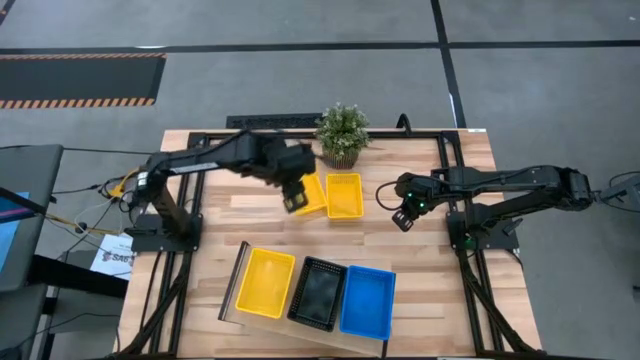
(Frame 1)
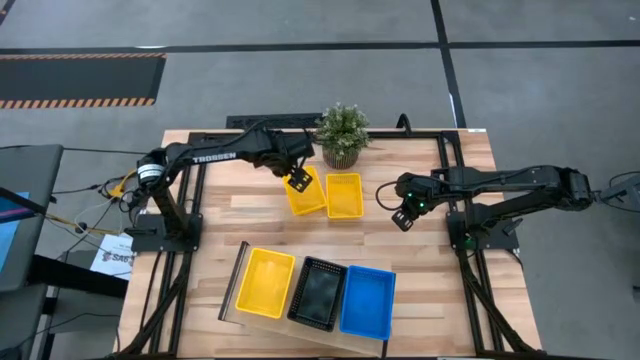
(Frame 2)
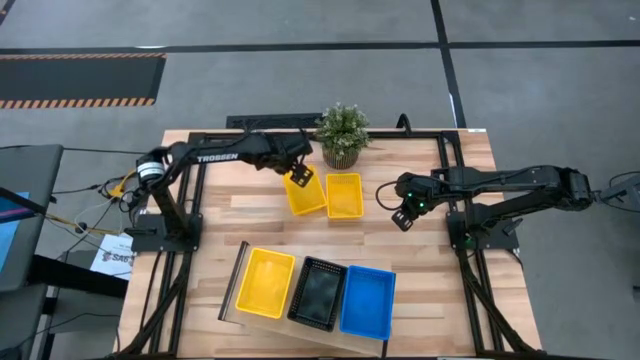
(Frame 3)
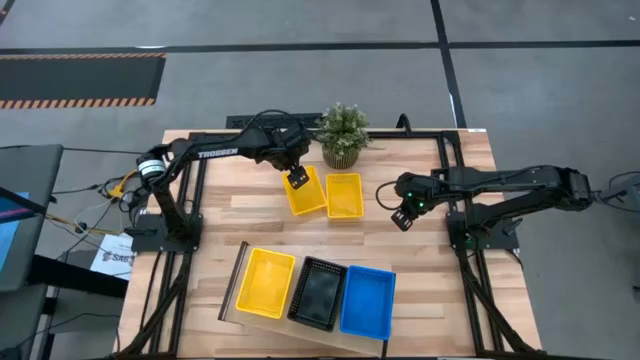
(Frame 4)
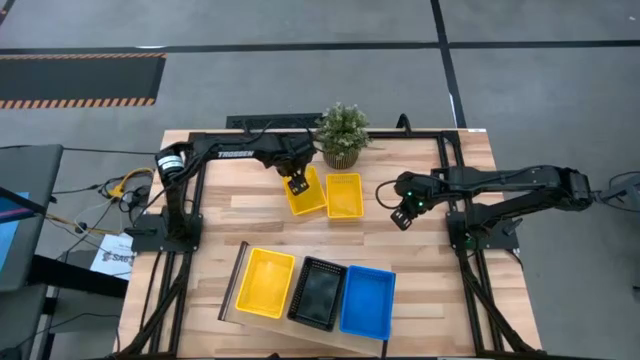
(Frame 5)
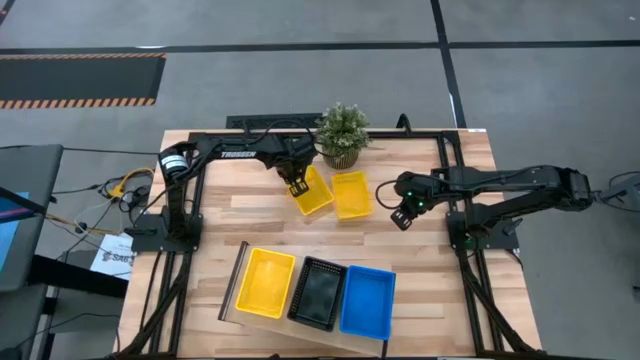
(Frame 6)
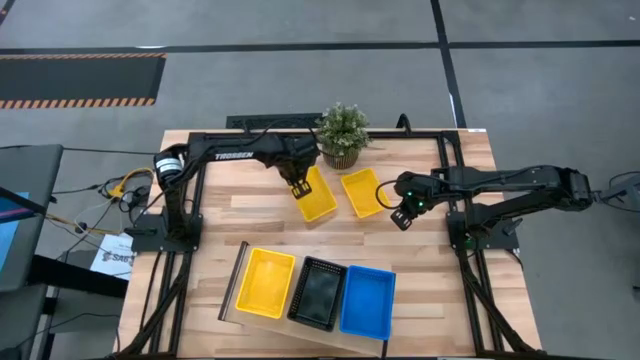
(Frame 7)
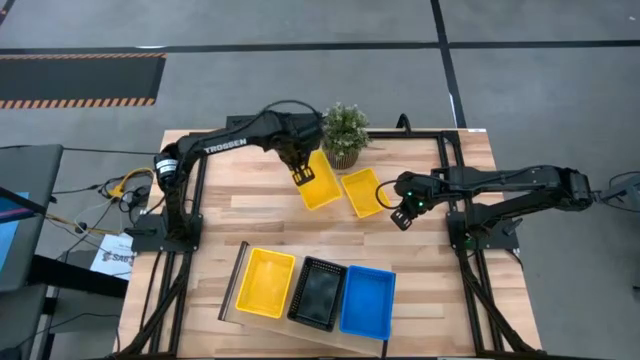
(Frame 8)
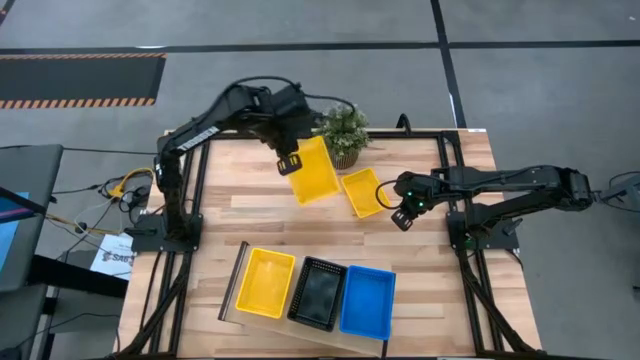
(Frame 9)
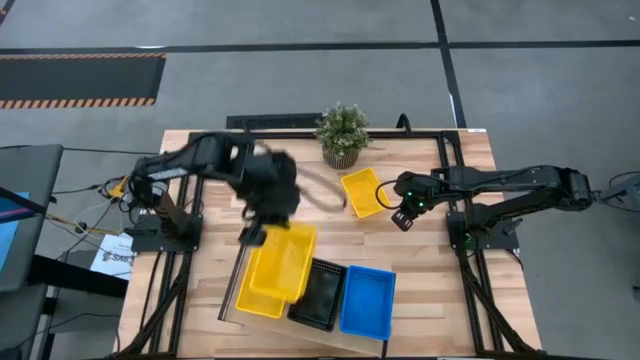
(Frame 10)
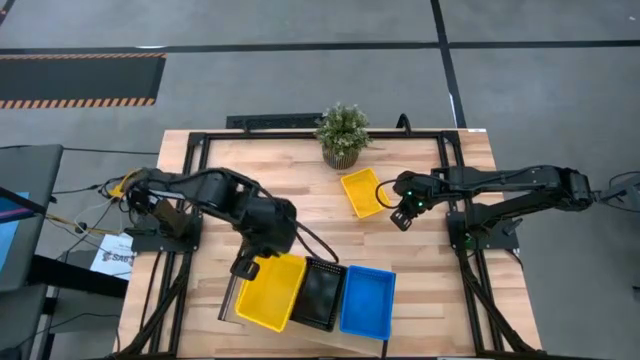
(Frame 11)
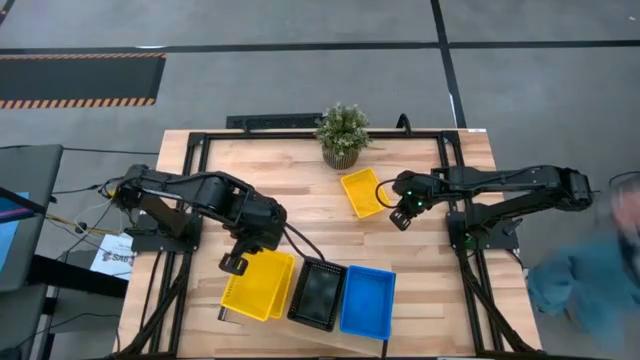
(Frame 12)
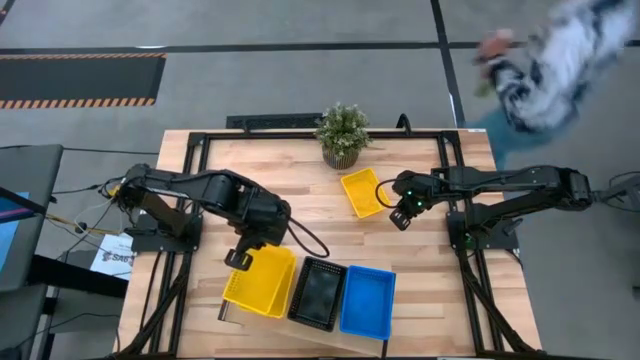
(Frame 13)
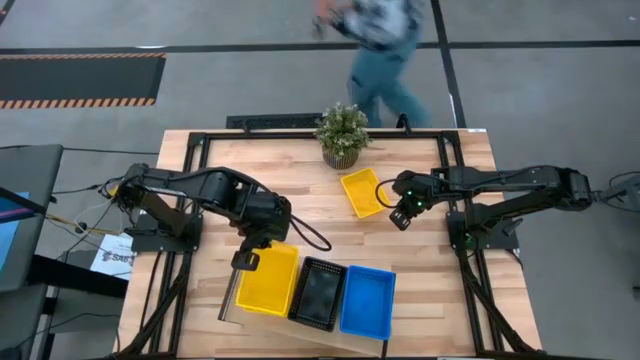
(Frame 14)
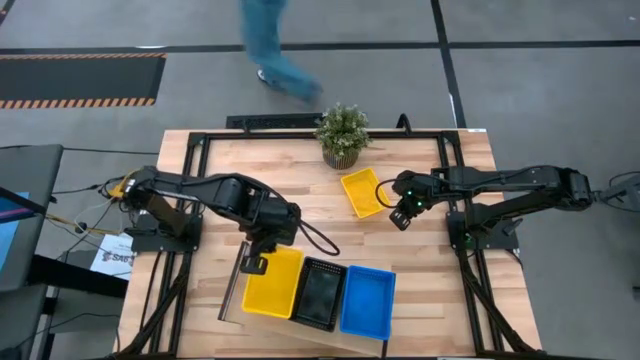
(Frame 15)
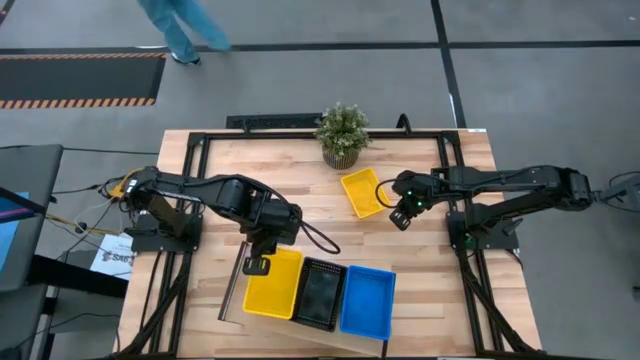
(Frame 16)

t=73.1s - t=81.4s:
Task: Stack baskets on shelf by color
Stack the left yellow bin on top of the yellow bin on the shelf

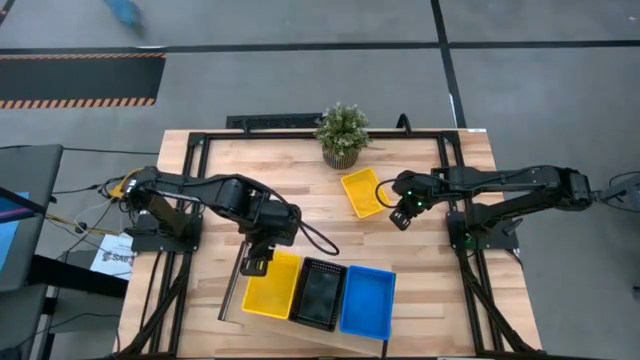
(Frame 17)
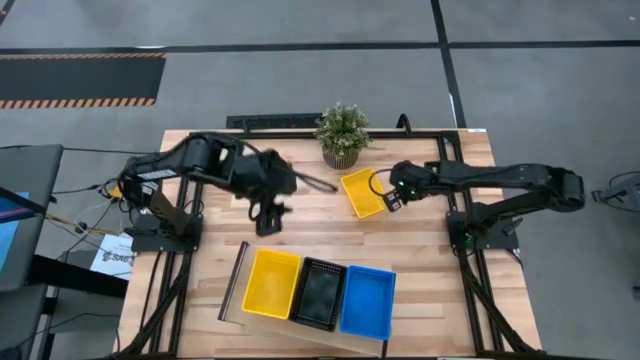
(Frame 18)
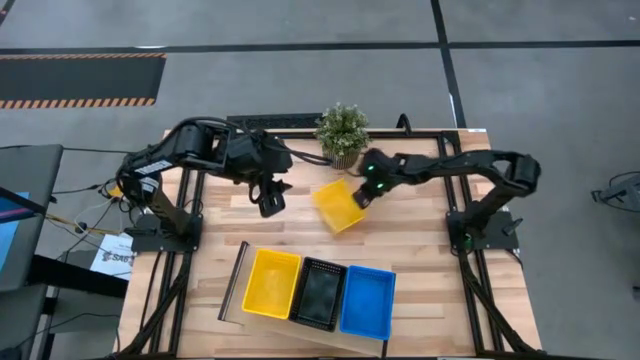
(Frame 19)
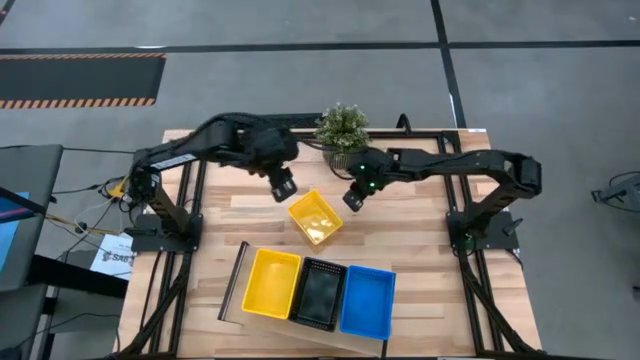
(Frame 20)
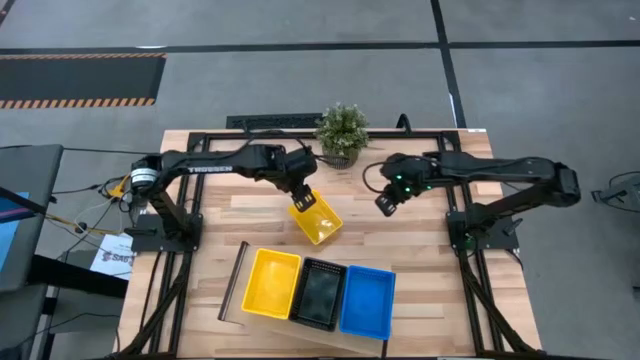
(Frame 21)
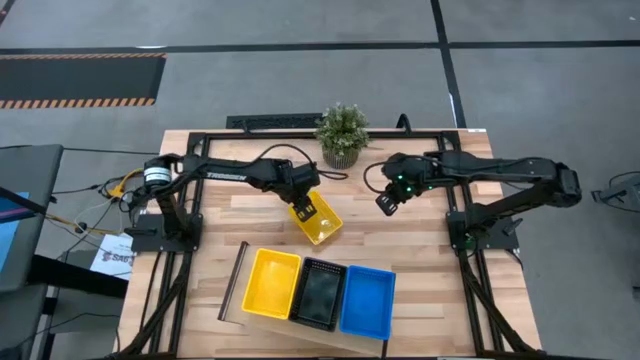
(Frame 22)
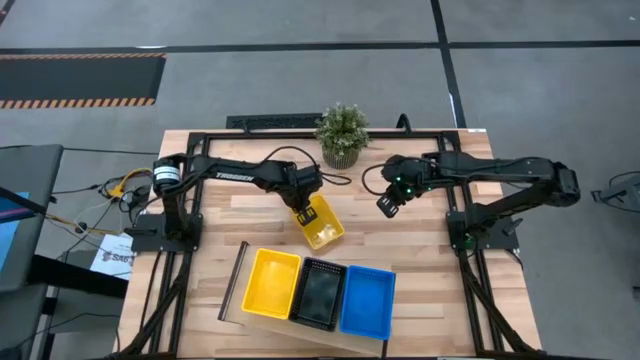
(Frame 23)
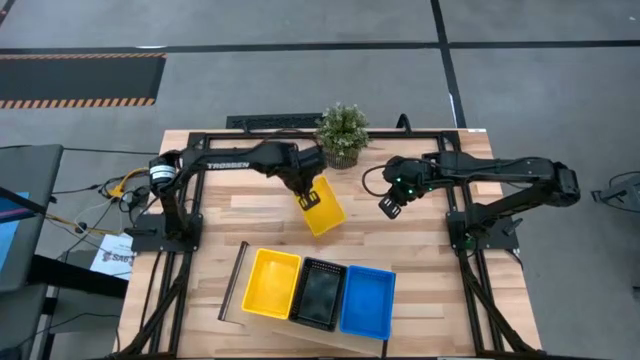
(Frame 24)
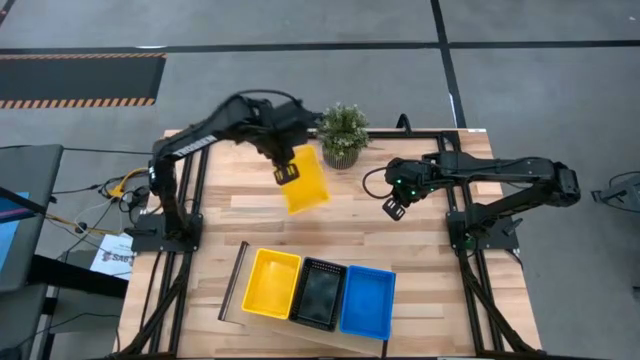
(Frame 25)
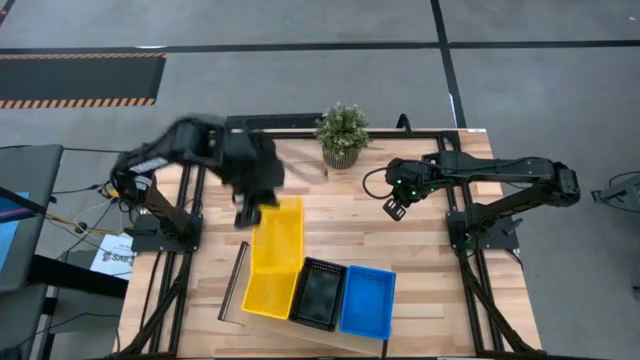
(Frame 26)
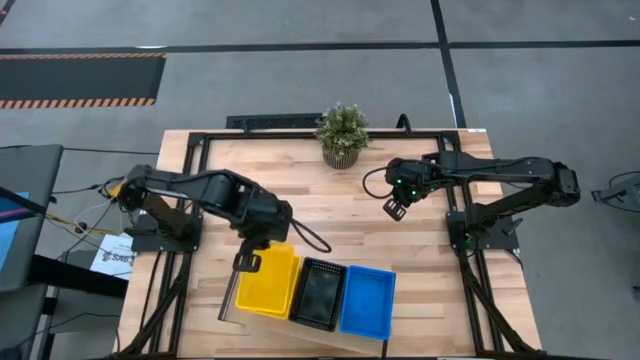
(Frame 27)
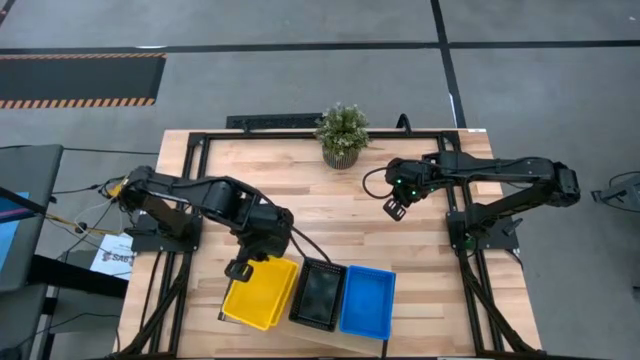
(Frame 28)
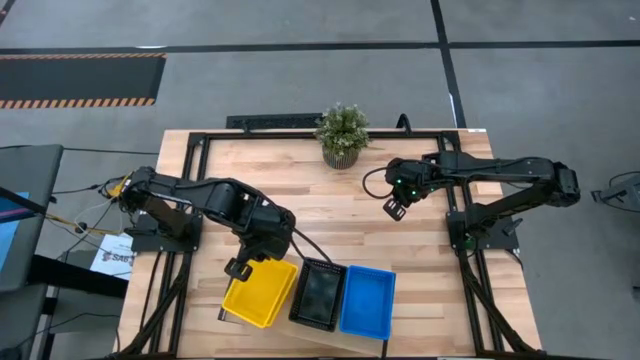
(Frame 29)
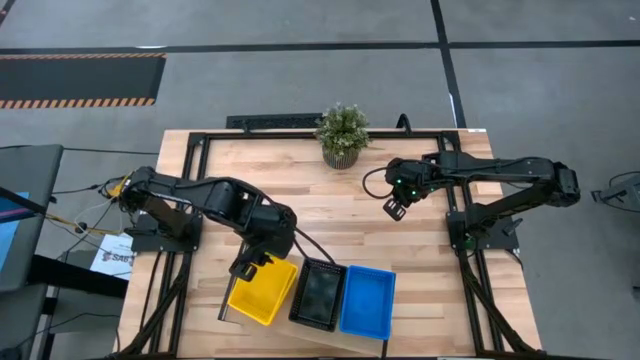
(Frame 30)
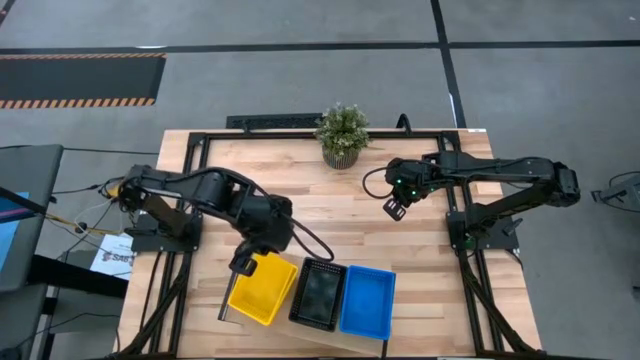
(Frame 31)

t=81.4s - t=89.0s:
Stack the yellow bin on top of the yellow bin on the shelf

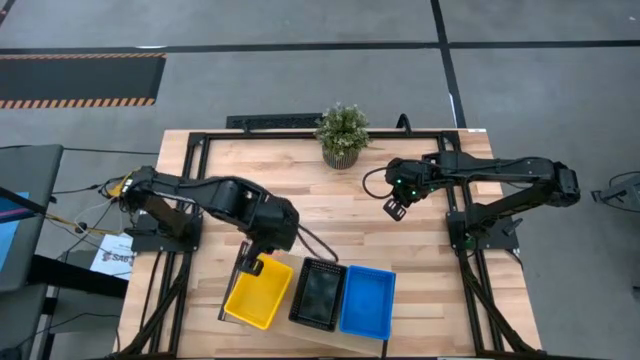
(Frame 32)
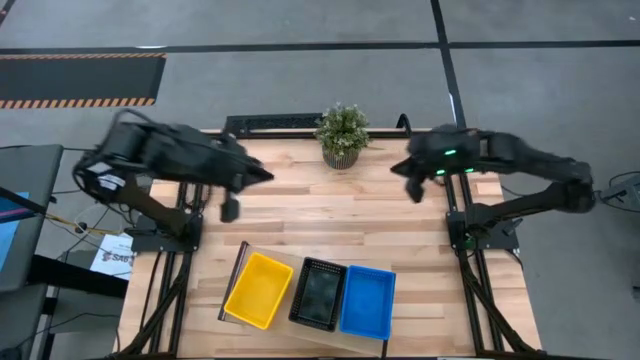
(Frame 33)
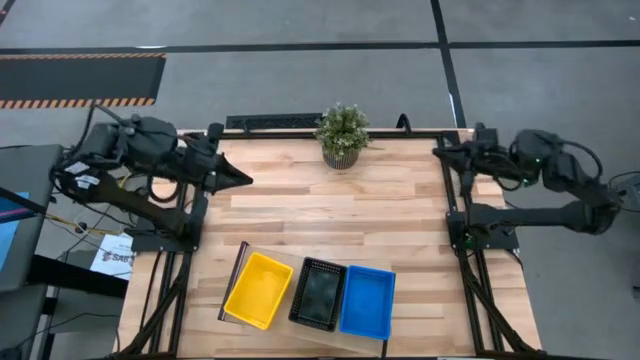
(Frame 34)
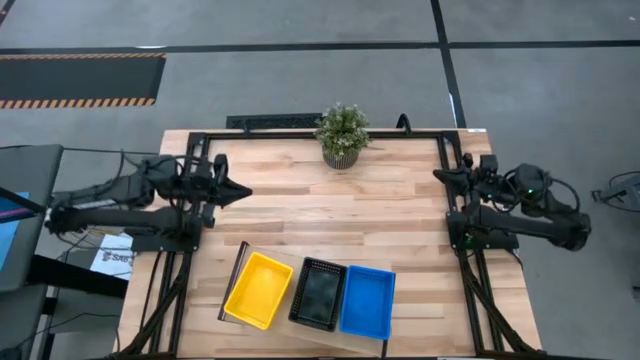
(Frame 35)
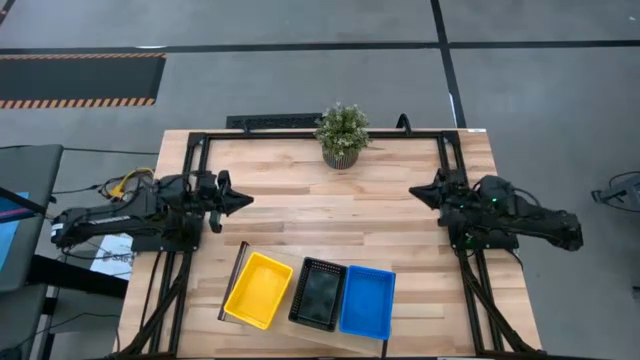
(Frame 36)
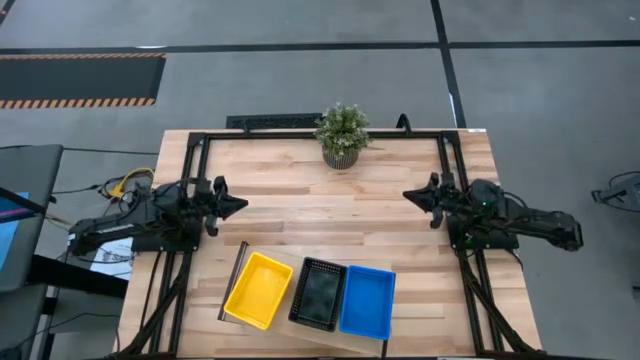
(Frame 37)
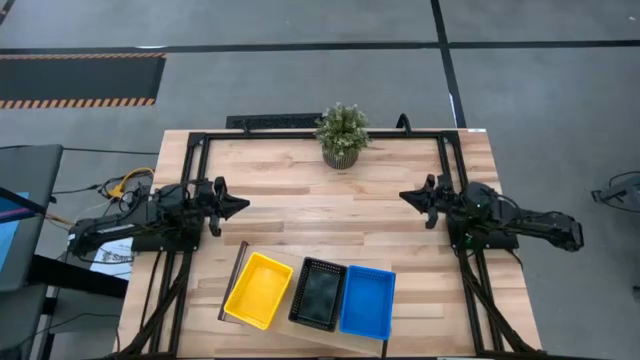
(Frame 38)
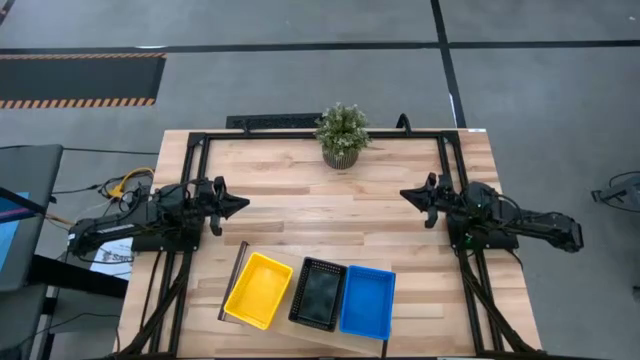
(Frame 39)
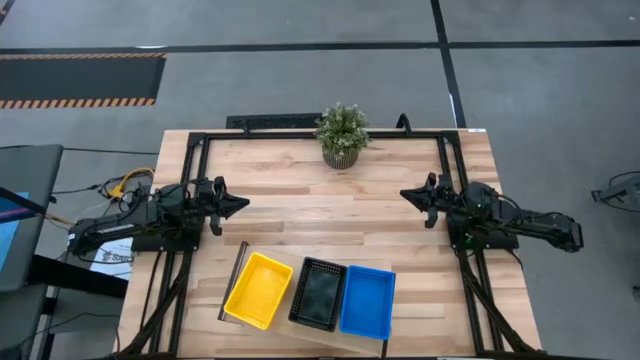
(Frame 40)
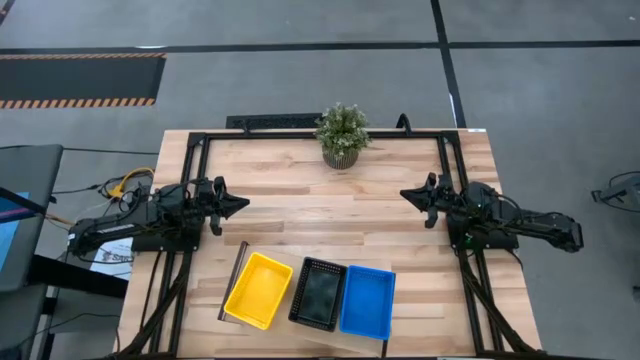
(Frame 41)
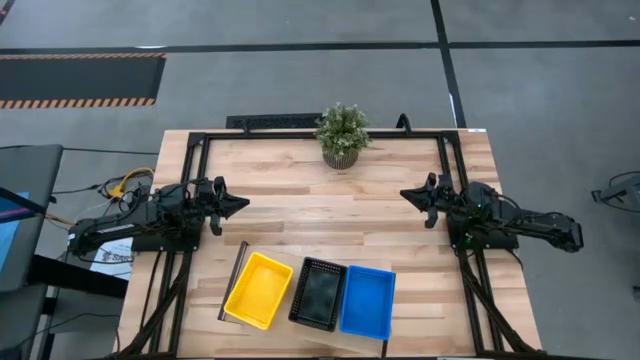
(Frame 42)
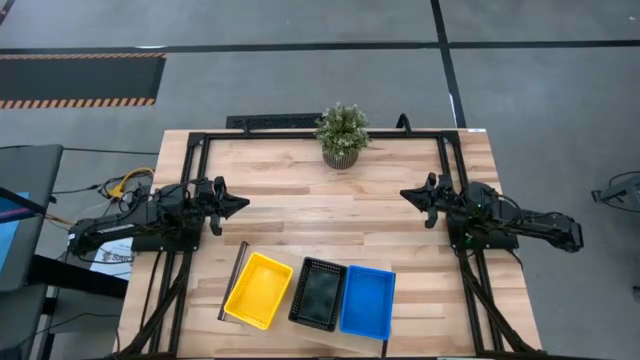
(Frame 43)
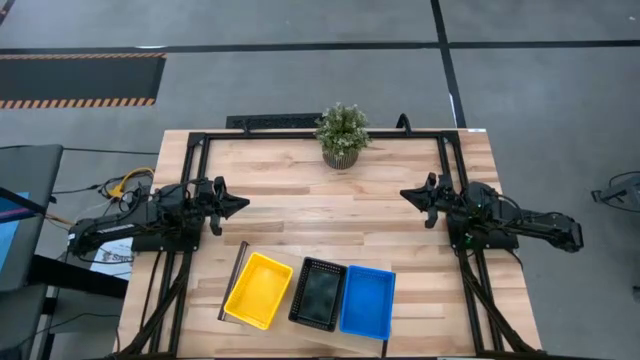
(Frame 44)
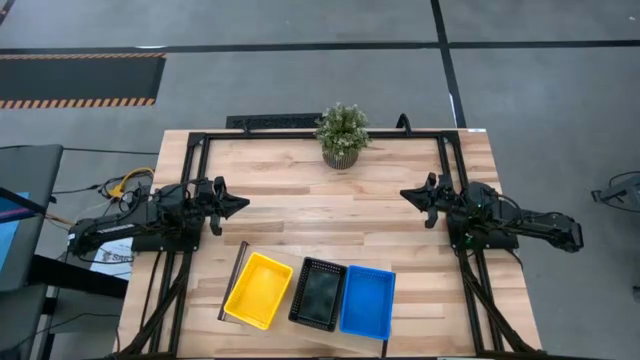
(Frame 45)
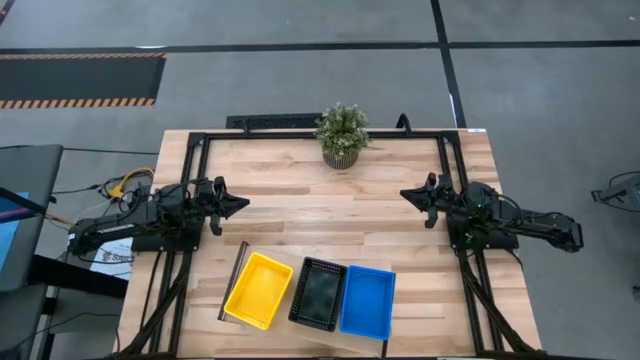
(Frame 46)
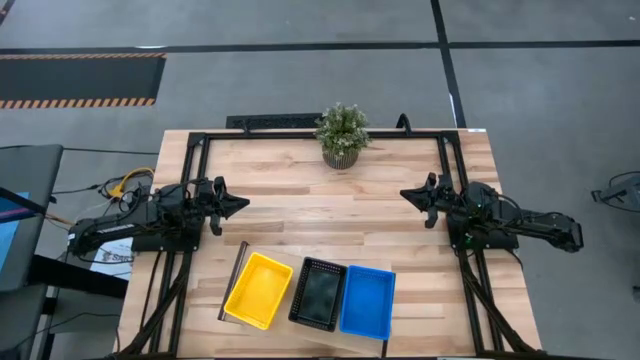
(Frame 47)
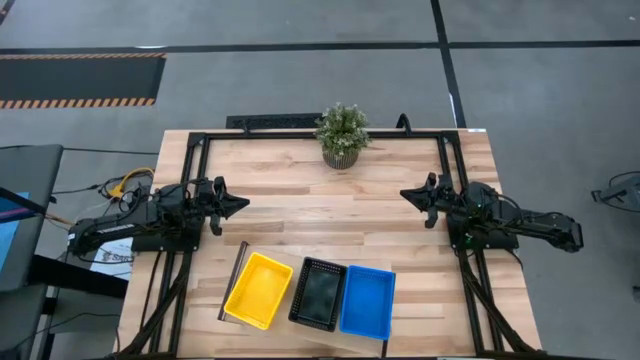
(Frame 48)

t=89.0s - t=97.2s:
Return to Home Position
